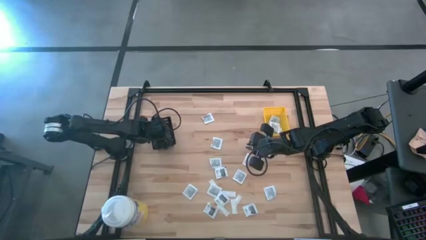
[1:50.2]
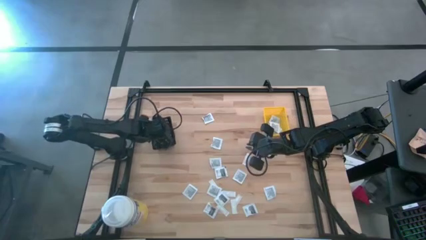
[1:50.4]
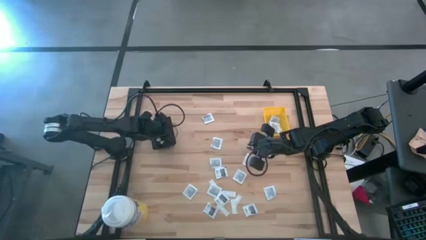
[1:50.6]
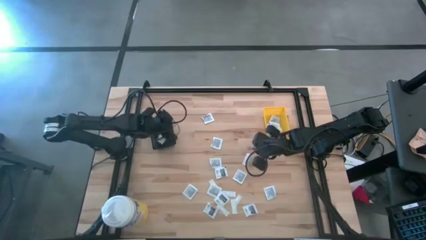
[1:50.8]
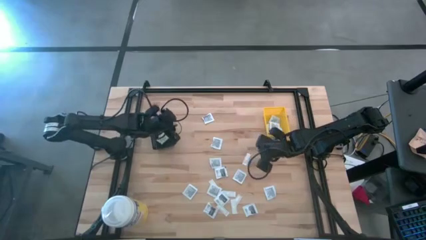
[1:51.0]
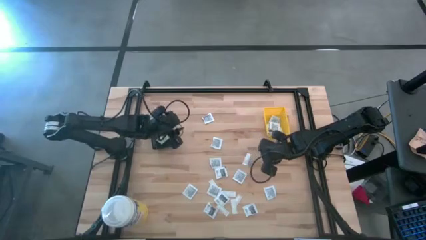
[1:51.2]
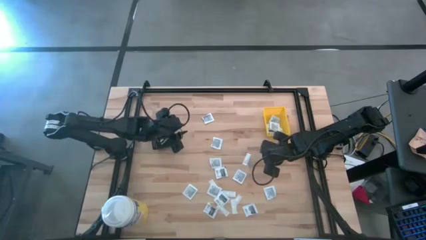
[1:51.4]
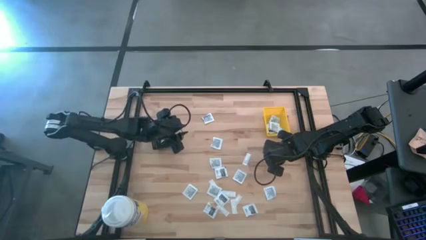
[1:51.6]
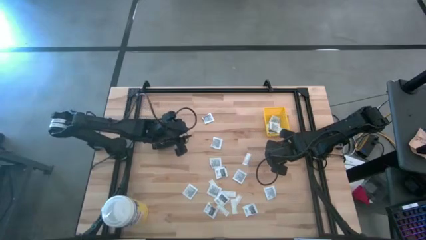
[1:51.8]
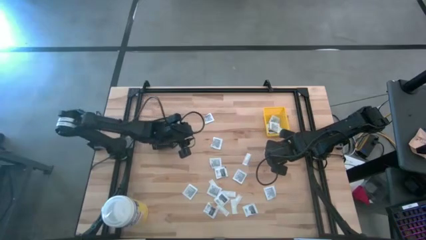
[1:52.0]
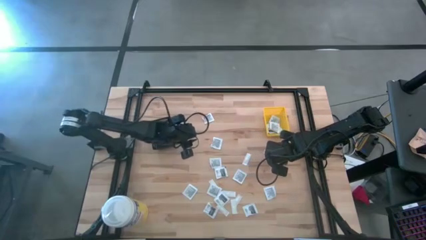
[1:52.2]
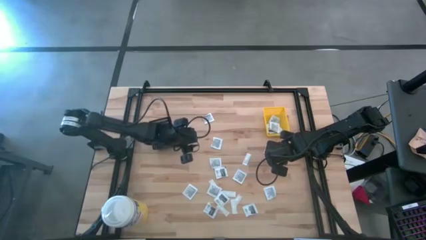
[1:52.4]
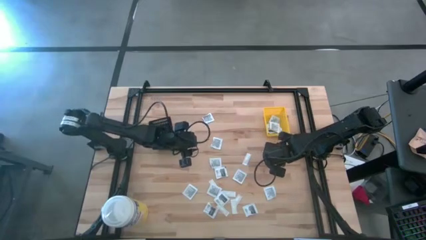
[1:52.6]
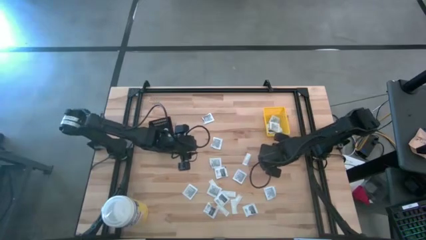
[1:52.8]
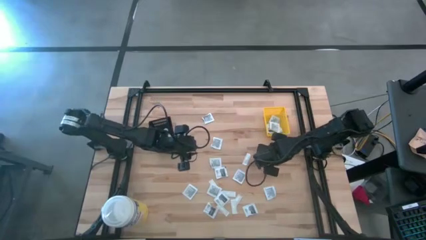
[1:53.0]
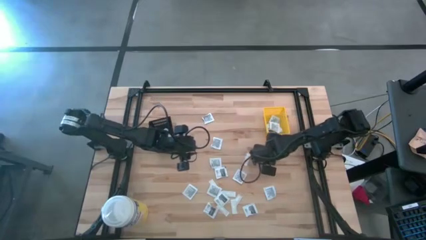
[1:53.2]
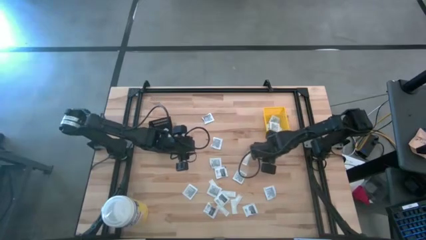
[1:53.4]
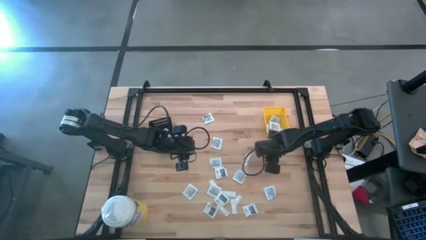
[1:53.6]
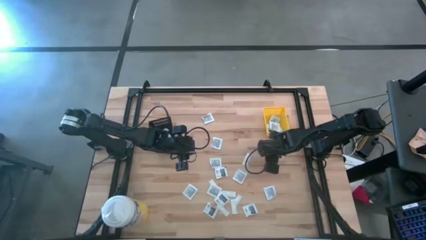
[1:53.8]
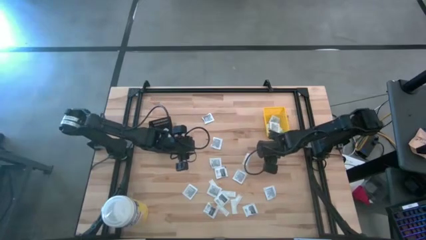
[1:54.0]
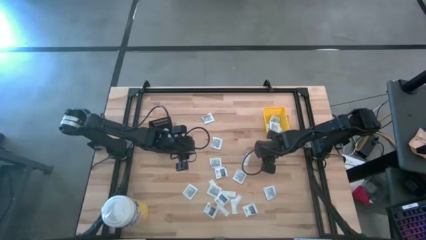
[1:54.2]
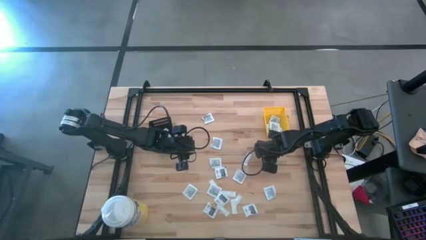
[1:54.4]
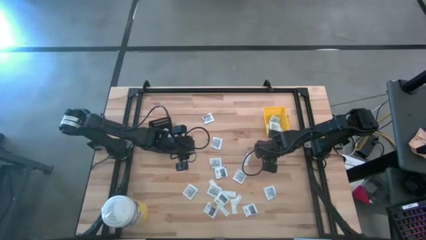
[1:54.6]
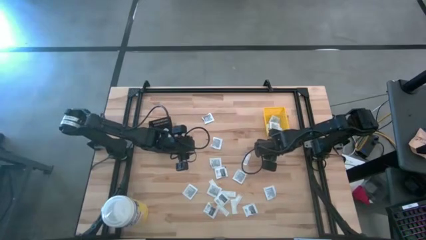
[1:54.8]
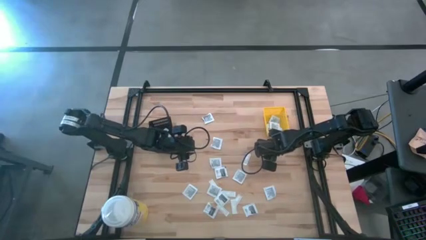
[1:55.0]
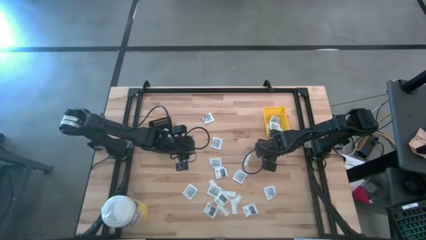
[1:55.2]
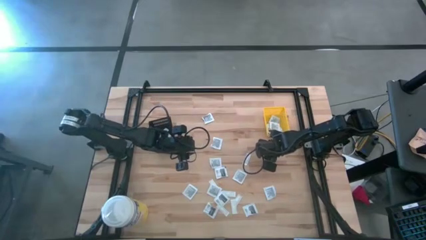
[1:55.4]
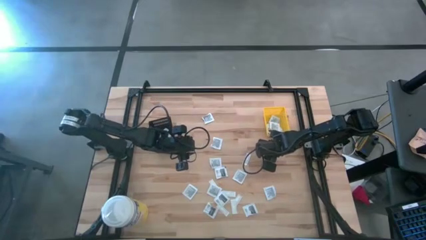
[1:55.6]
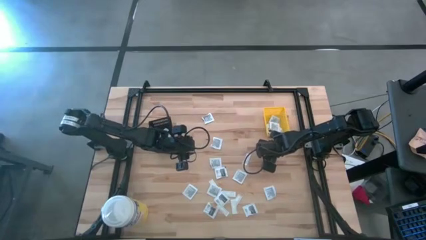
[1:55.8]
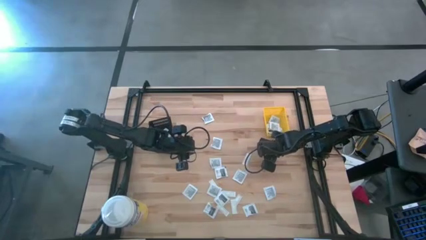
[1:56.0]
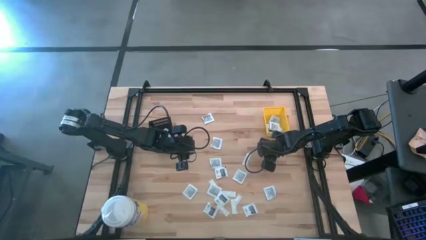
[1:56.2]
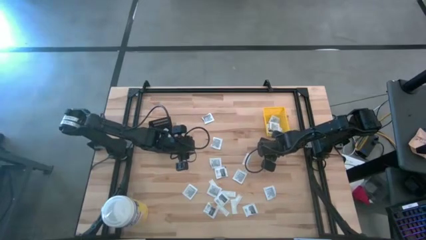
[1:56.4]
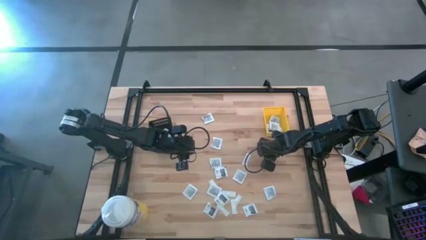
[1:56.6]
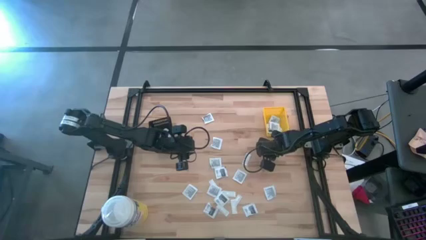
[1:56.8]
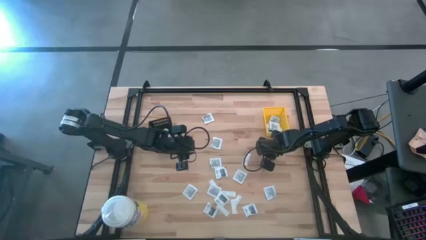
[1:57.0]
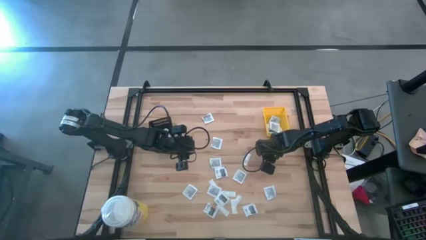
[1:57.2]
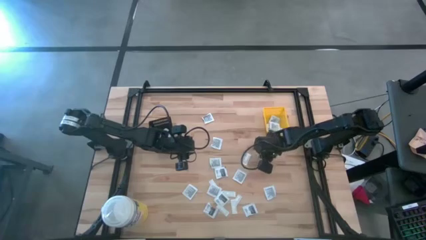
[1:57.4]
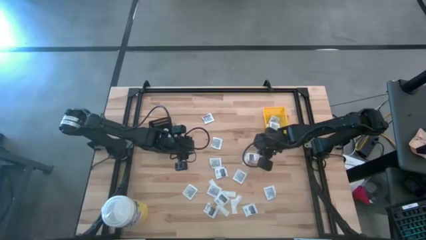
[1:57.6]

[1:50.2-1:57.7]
Task: Pick & Place First Aid Supplies
Put the black pad into the yellow bin

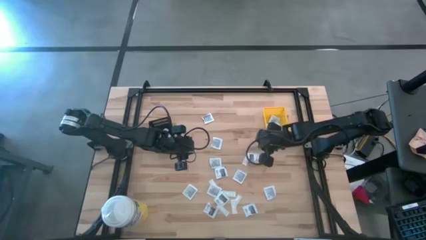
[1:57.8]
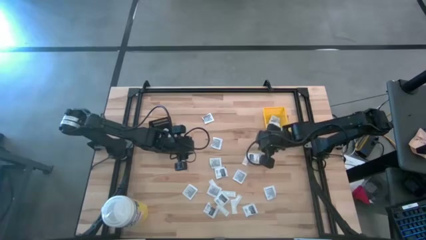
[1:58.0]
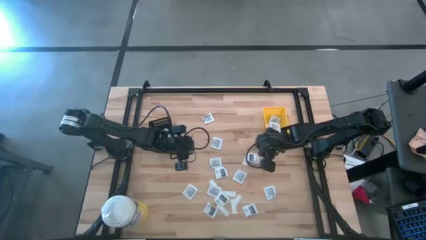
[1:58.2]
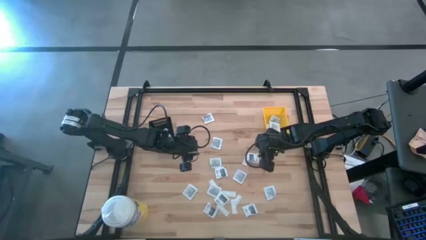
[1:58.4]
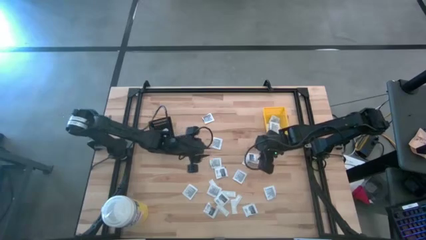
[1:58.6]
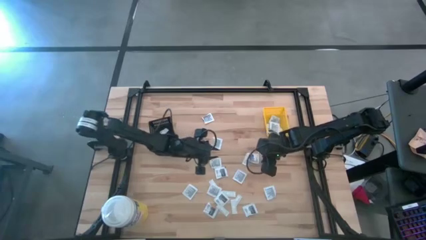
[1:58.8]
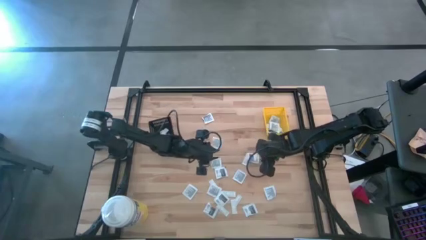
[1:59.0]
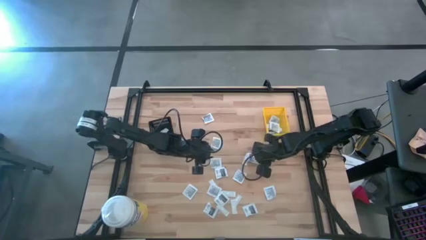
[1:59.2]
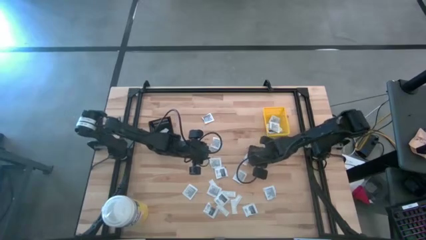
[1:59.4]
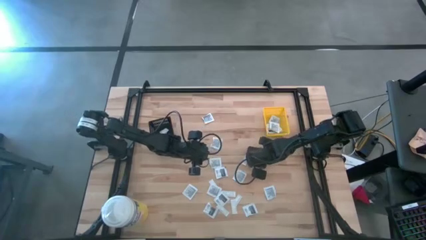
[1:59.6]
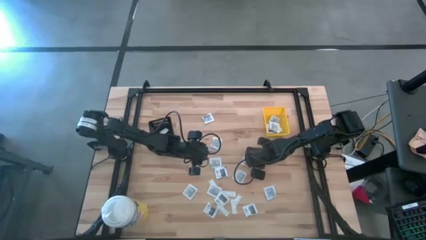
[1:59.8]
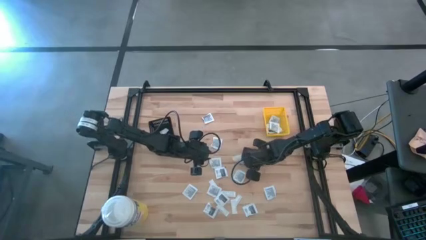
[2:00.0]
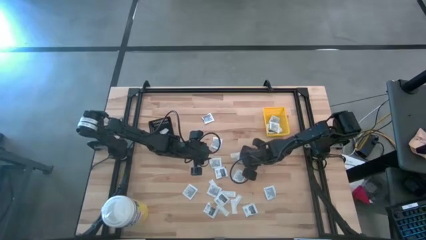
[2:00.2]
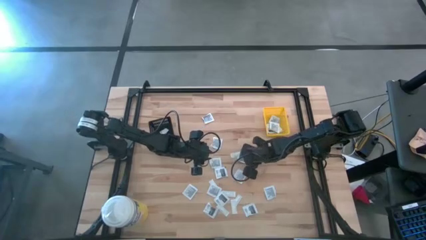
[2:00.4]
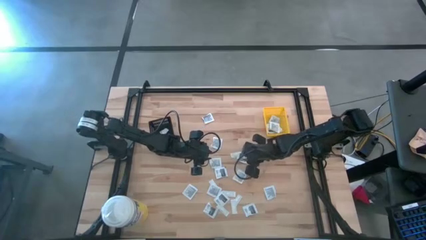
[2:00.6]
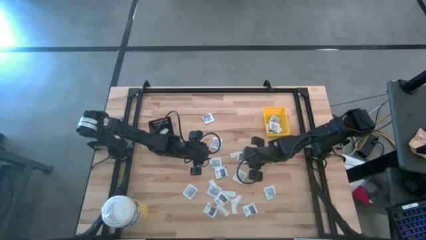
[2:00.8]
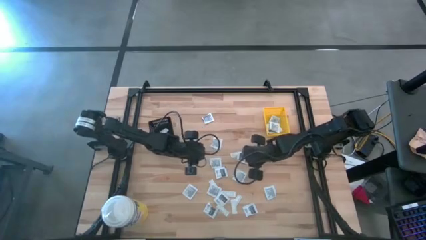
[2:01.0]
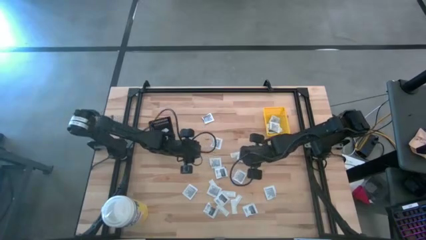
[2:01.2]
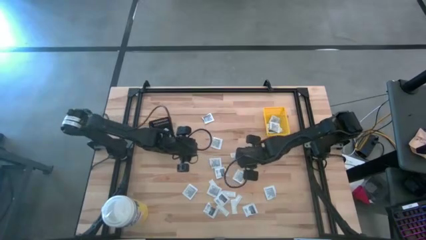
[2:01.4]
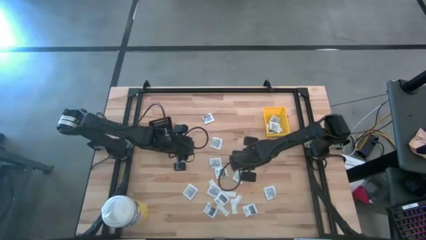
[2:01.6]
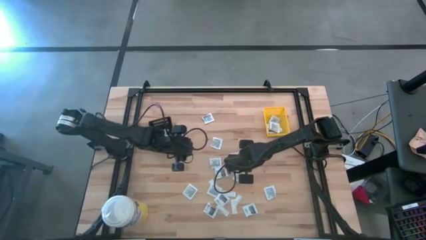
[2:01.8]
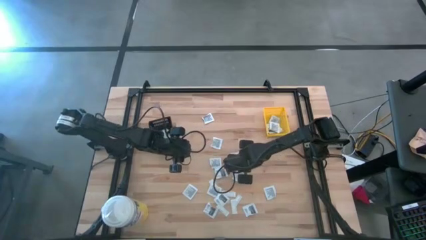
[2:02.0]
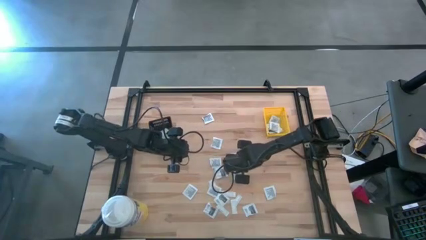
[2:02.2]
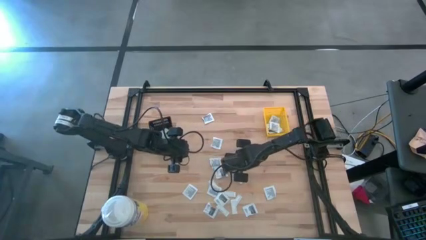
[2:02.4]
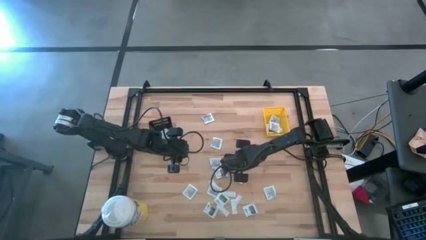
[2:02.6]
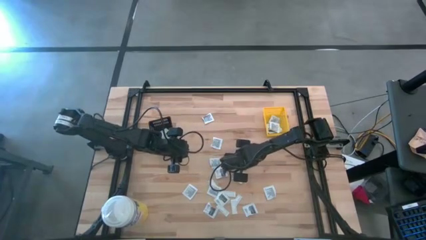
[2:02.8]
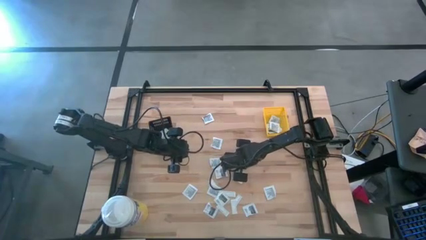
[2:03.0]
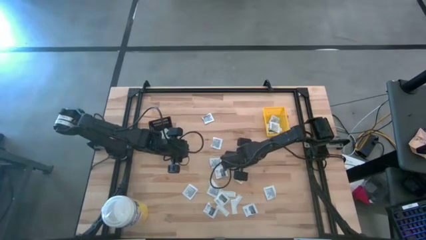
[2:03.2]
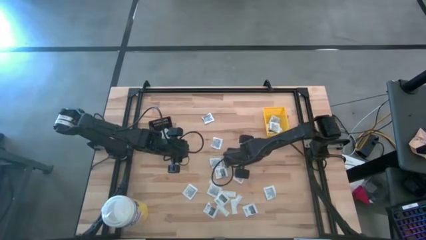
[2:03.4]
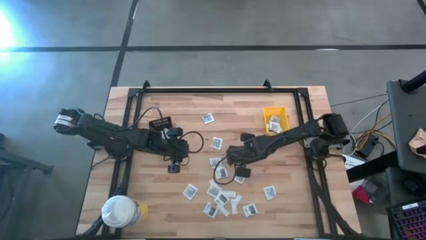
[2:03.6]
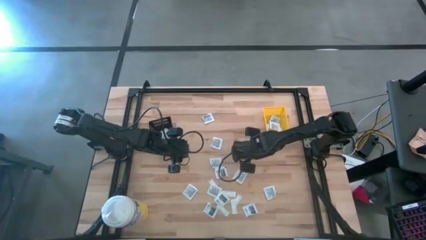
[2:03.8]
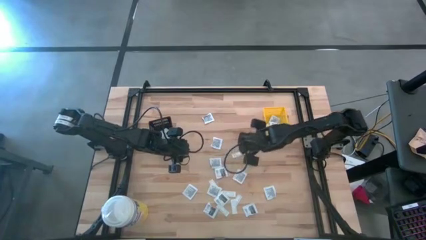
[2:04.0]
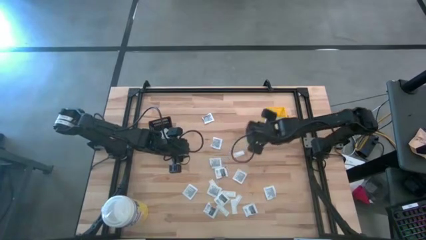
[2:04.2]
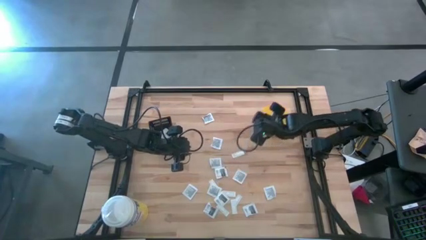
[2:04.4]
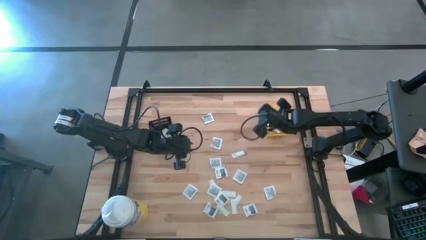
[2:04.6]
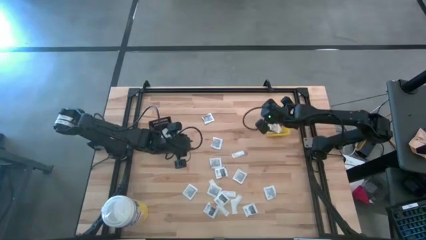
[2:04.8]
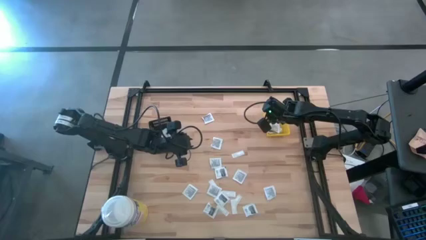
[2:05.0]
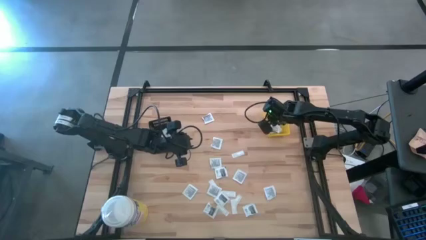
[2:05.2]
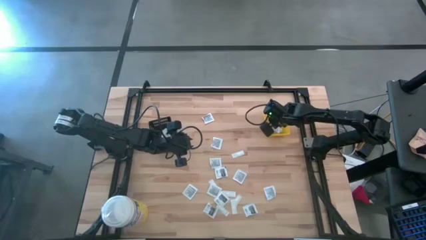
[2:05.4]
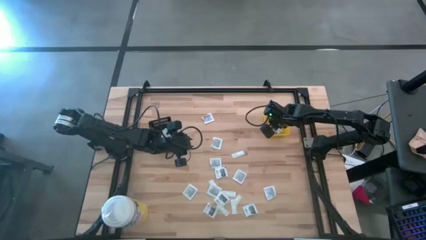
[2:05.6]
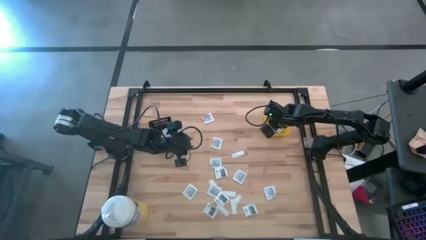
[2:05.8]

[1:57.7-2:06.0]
Put the black pad into the yellow bin
